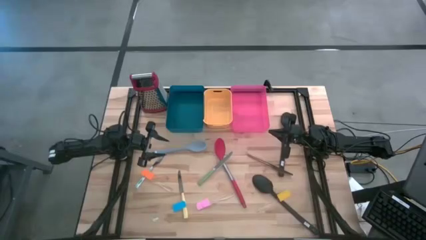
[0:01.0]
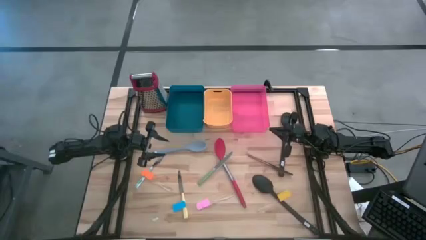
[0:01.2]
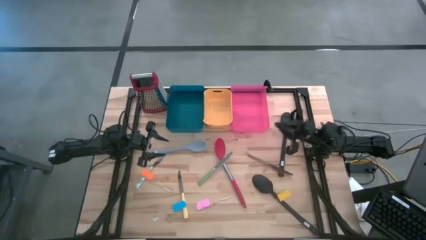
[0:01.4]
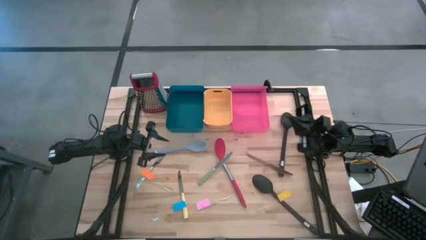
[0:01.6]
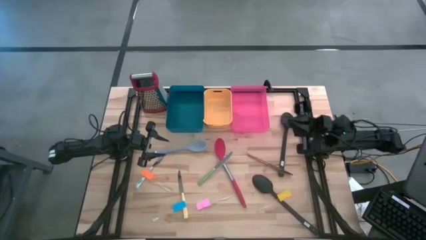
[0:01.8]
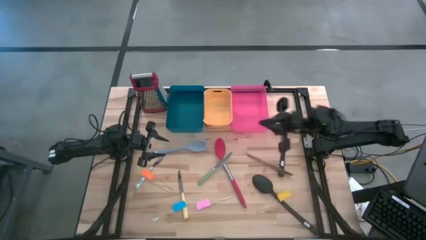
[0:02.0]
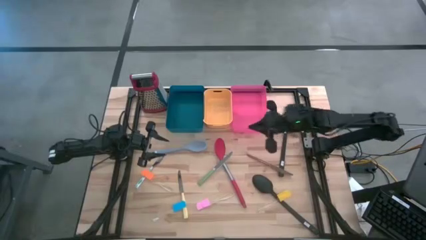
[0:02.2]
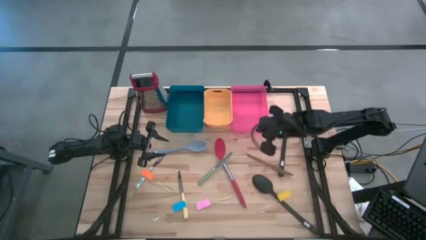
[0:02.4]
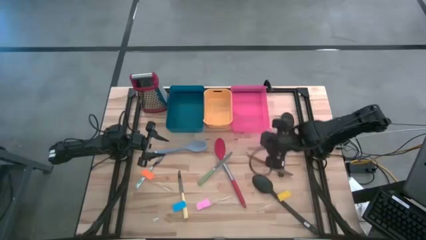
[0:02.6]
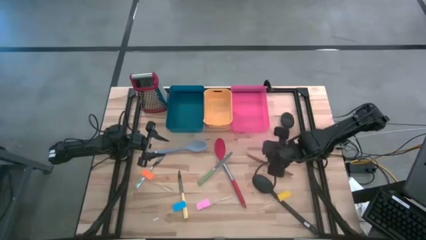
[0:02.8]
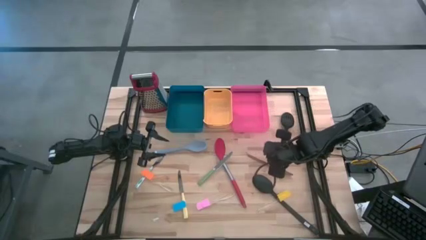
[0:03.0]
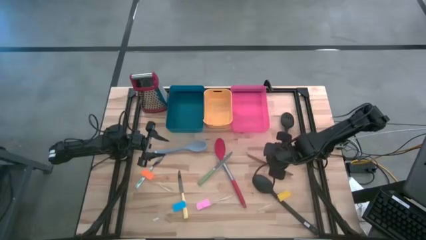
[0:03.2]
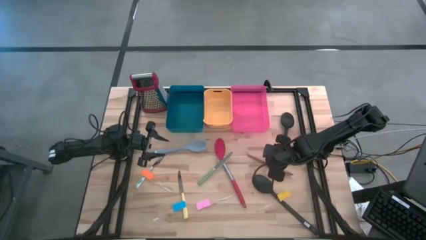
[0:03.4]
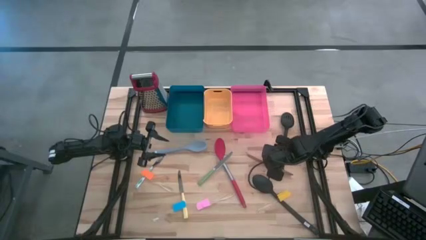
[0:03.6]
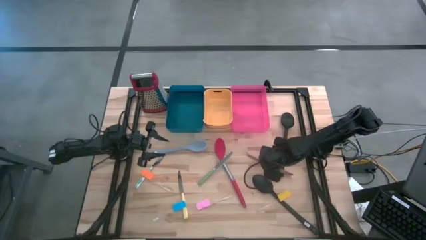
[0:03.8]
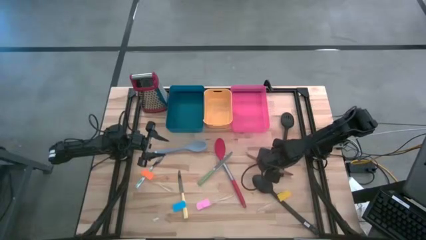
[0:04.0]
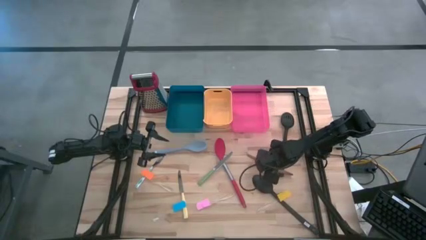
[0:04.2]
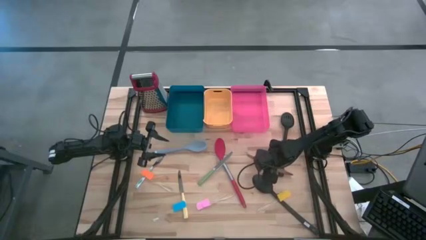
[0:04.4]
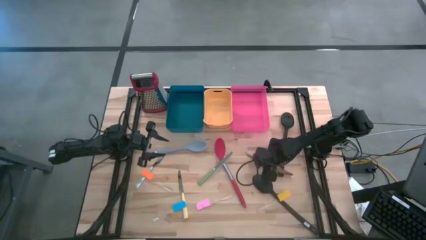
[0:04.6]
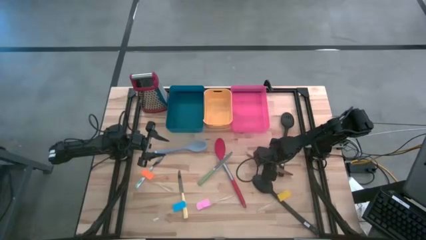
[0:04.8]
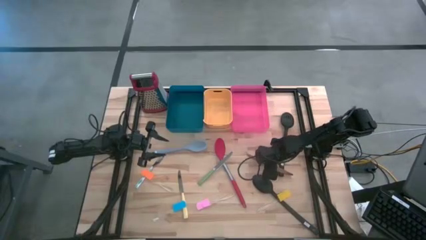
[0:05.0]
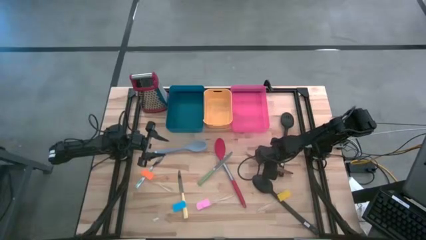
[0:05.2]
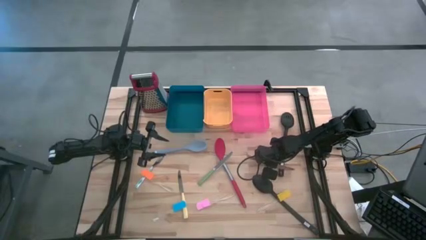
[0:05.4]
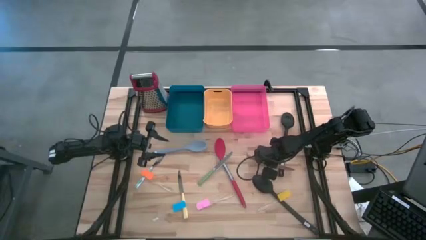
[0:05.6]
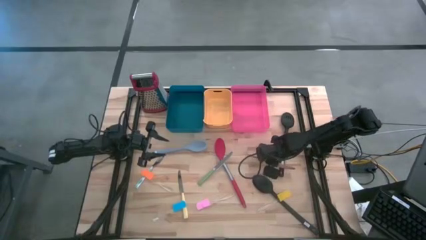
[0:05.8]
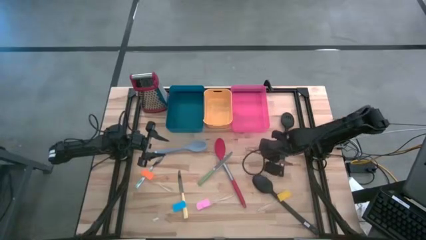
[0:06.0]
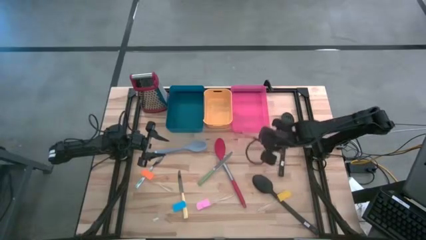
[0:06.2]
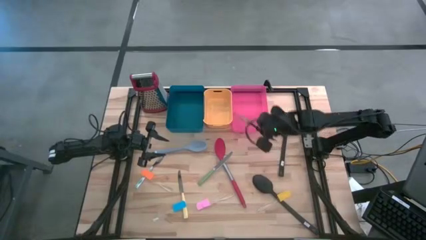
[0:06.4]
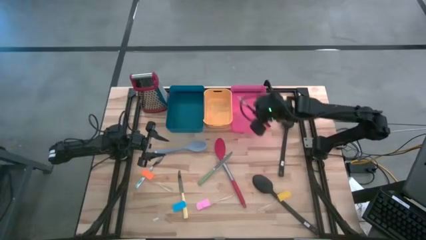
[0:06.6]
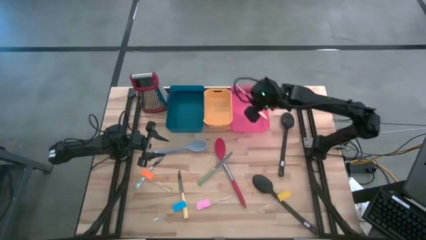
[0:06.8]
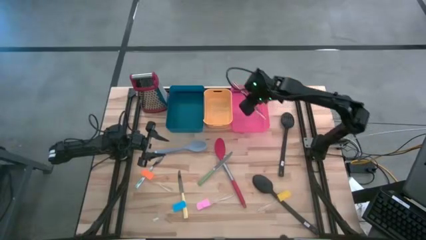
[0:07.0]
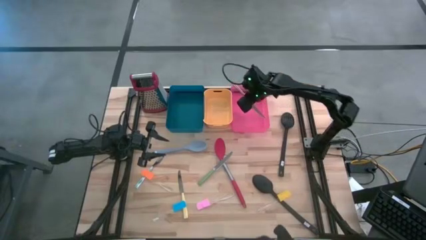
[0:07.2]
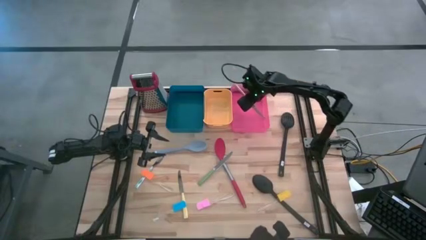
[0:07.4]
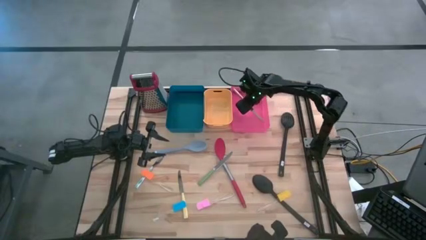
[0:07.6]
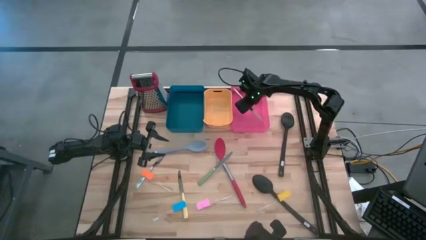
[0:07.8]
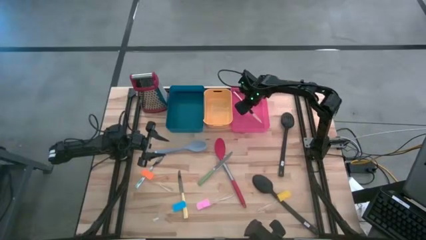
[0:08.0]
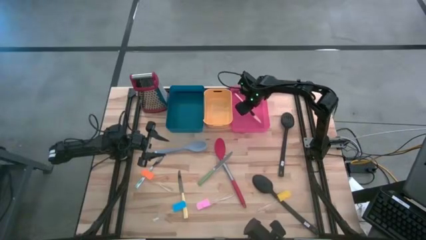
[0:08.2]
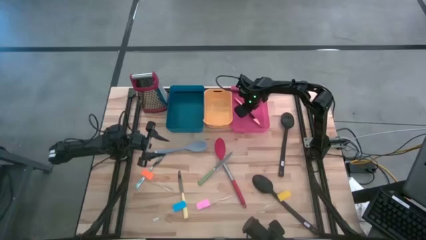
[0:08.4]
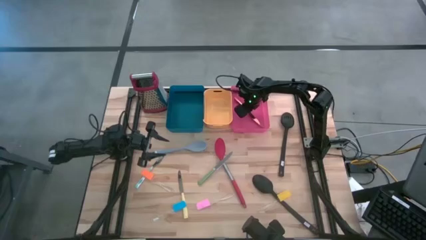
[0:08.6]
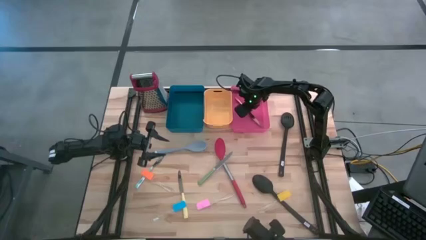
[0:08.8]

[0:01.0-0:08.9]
Task: Pick & Place Kitchen Items
Put the brown knife into the red bin

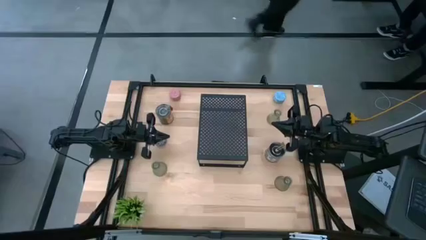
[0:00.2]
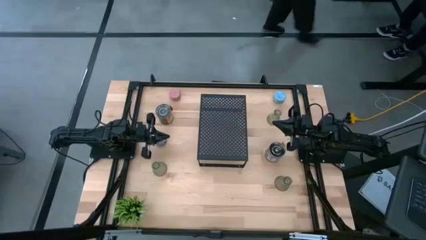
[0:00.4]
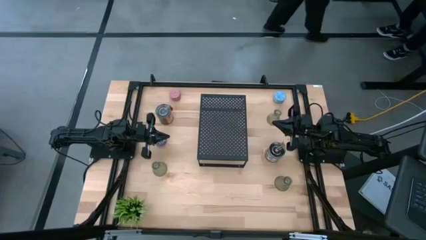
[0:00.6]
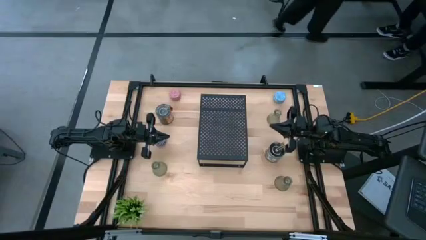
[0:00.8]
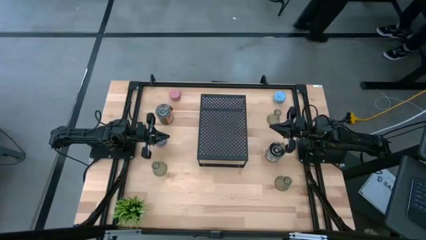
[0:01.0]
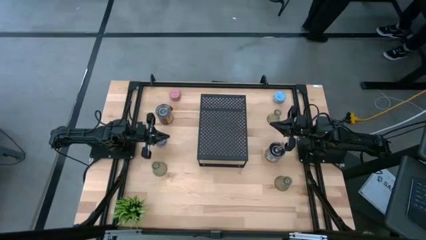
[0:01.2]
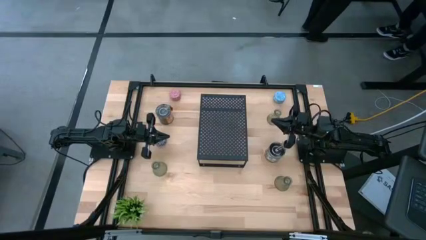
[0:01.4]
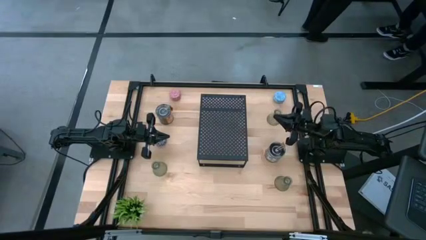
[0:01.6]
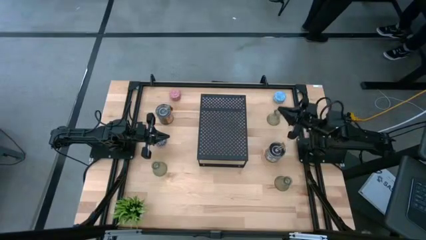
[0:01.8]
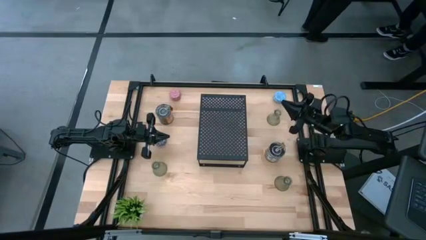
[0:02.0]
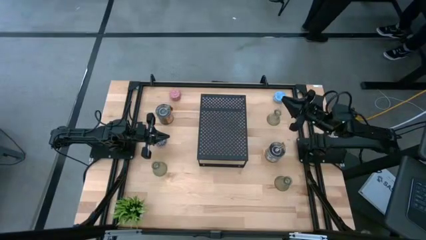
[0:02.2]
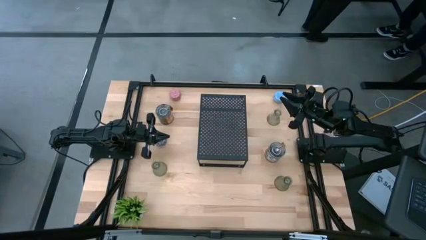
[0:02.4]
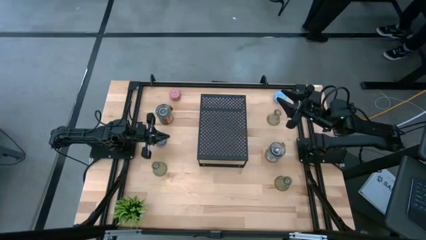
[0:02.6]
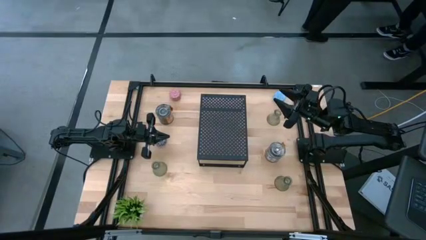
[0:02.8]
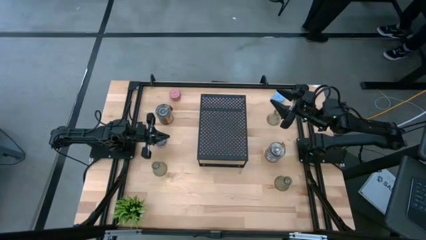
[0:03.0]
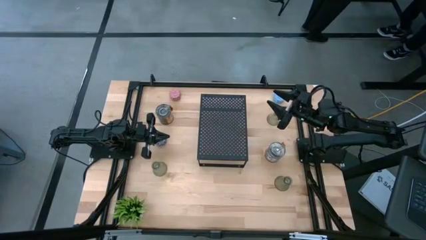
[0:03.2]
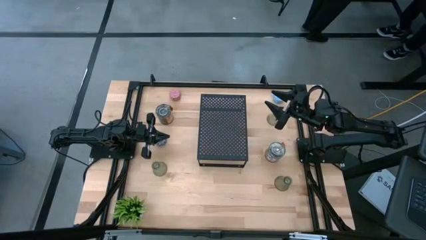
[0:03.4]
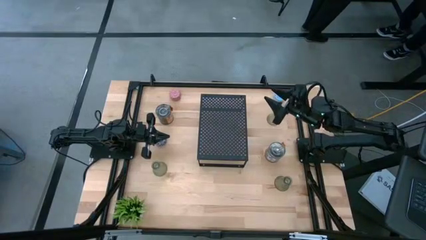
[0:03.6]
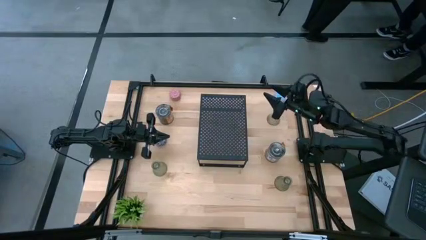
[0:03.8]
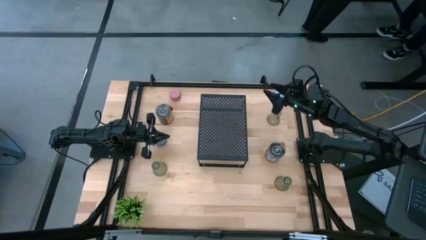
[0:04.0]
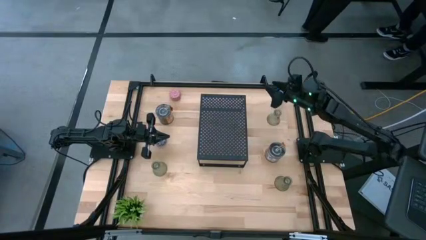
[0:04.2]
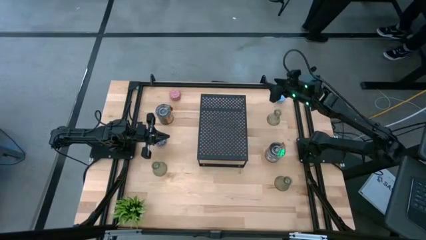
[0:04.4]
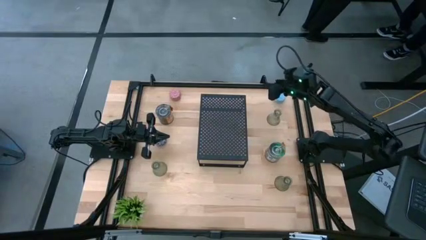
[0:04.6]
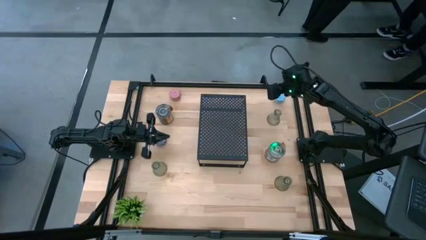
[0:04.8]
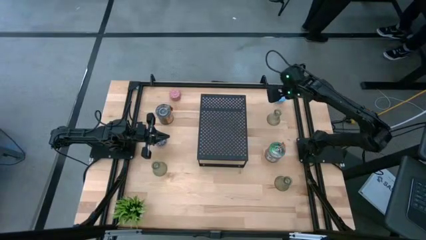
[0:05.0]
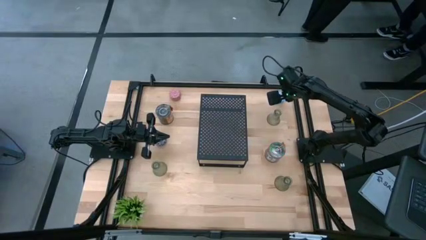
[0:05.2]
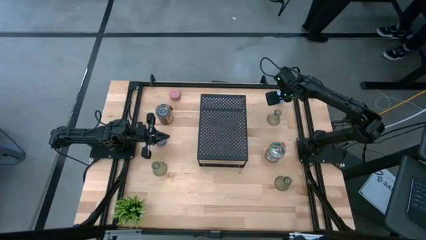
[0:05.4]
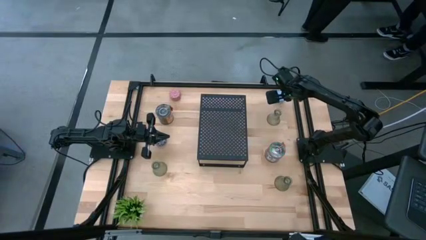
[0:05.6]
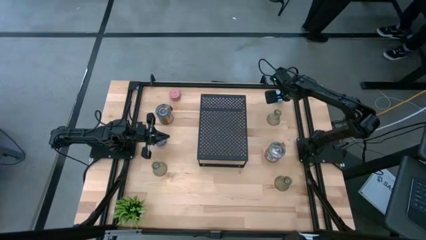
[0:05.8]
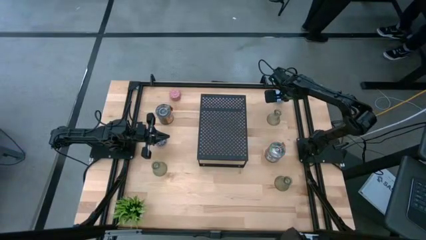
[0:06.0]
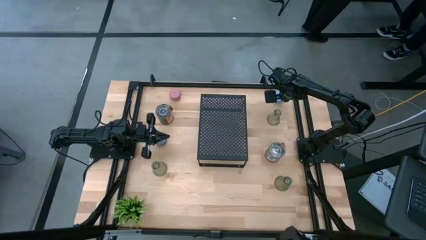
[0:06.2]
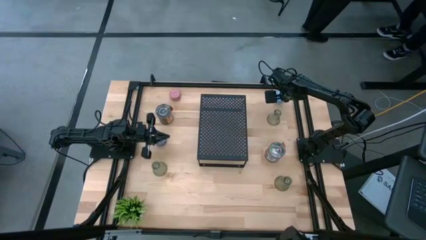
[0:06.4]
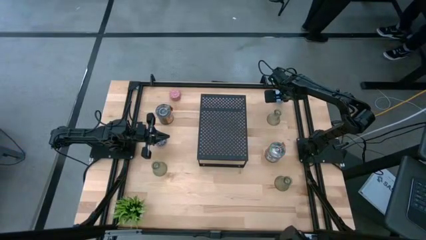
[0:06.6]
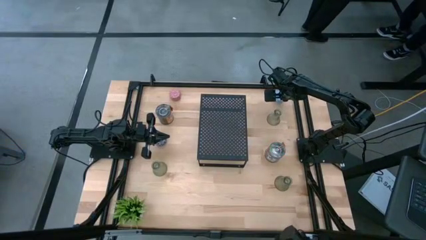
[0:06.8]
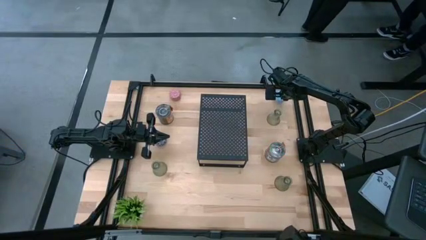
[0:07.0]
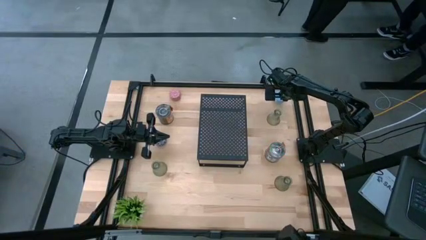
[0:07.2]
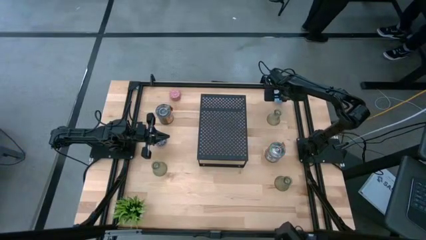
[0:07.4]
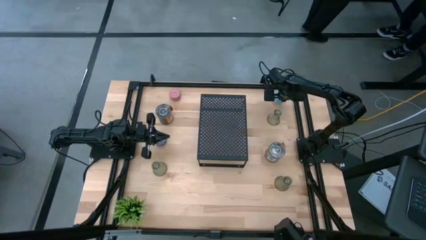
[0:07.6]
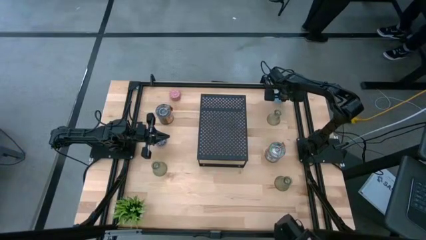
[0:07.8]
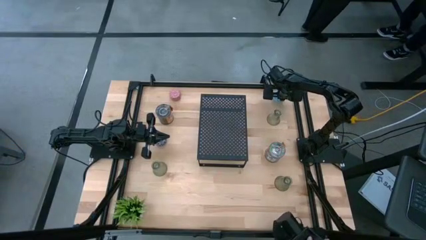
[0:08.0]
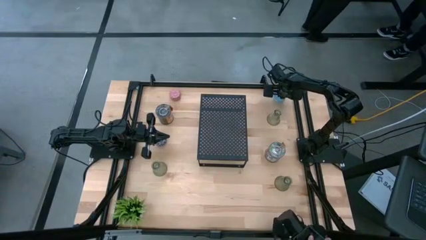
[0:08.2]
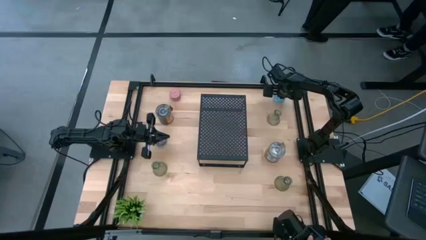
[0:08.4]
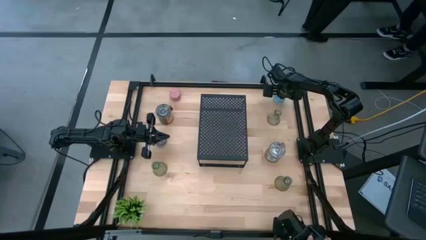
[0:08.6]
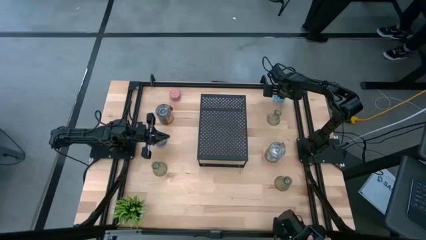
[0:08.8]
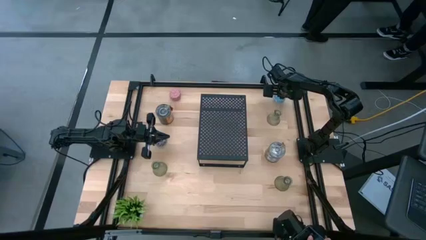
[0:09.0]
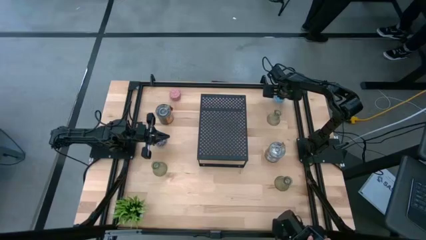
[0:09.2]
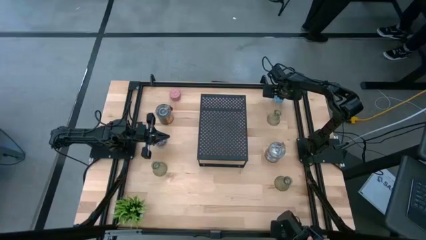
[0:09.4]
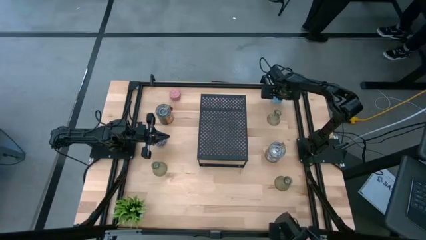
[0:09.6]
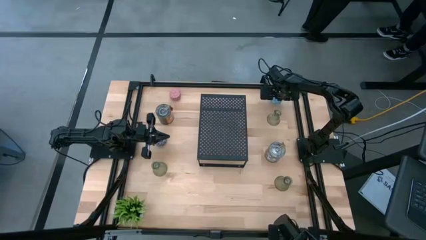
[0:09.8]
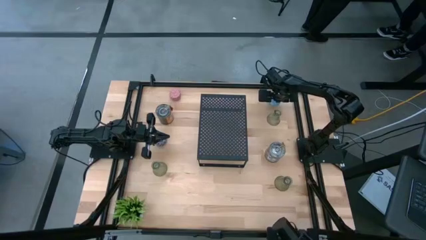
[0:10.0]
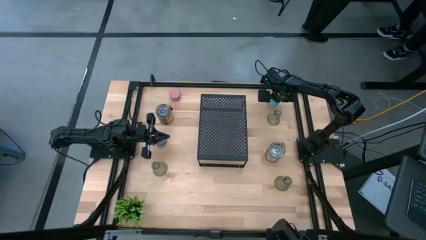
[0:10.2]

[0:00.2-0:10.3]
Task: Pick & Place candle stick holders
Put the patterned blue scented candle on the shelf
